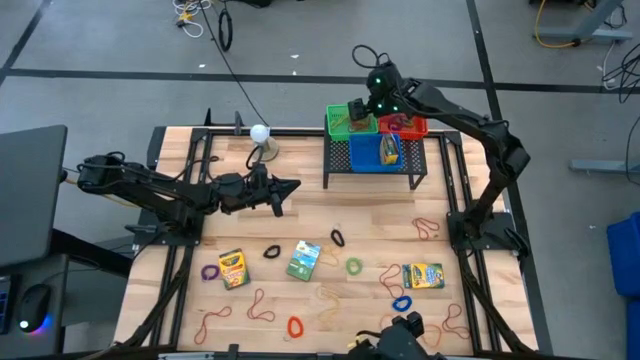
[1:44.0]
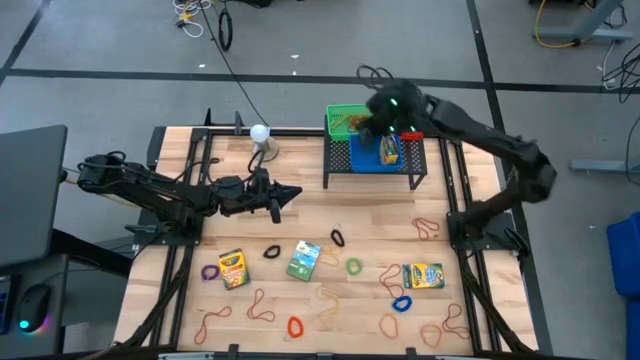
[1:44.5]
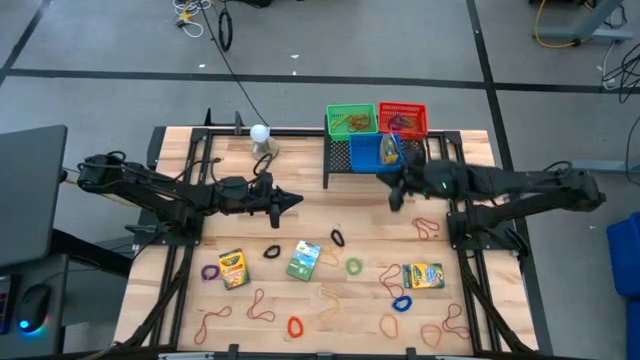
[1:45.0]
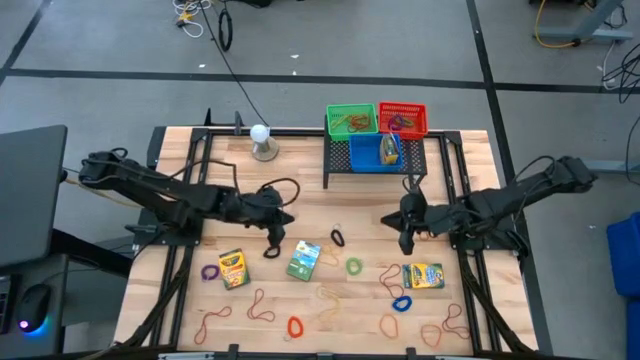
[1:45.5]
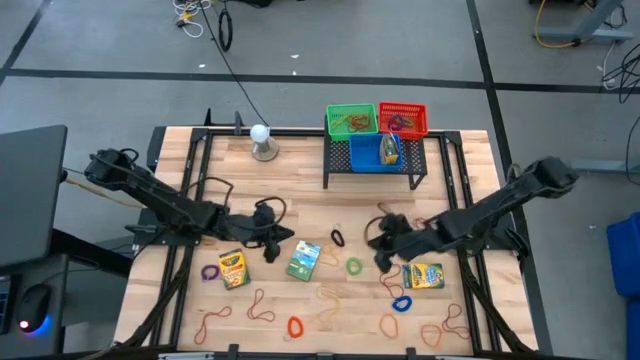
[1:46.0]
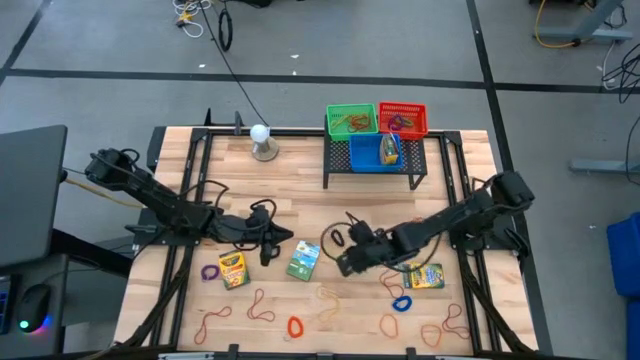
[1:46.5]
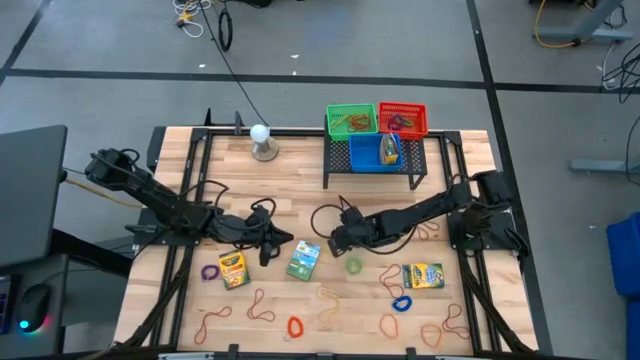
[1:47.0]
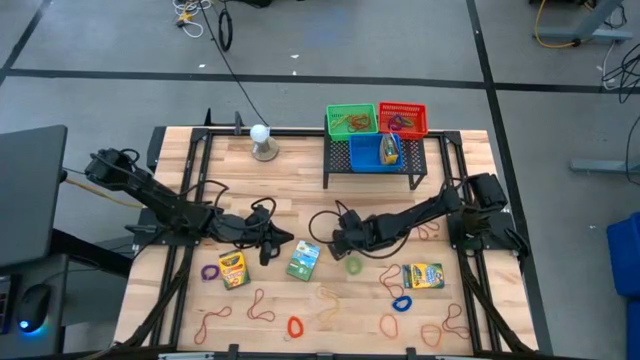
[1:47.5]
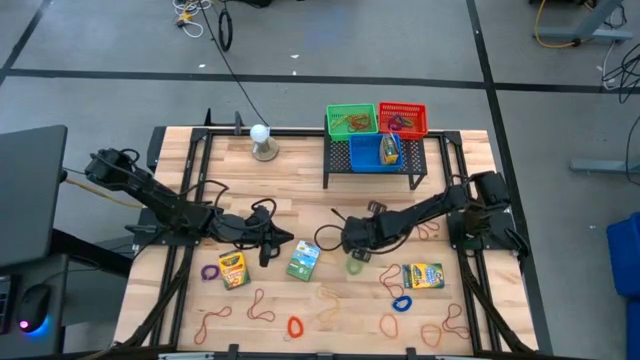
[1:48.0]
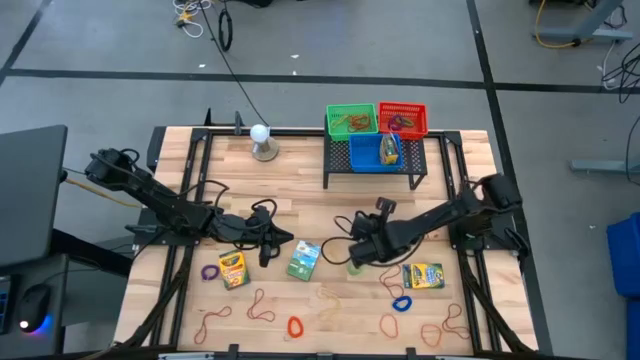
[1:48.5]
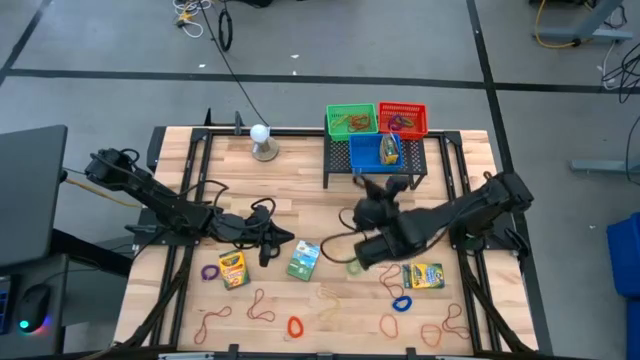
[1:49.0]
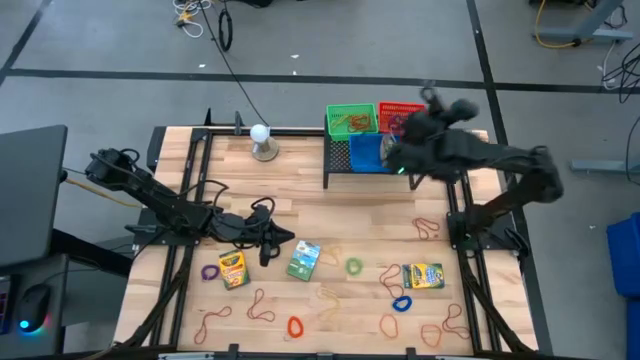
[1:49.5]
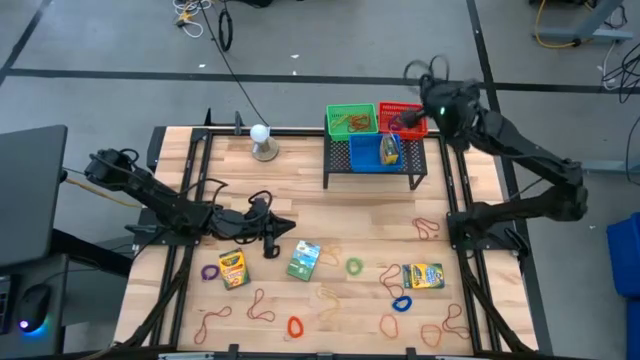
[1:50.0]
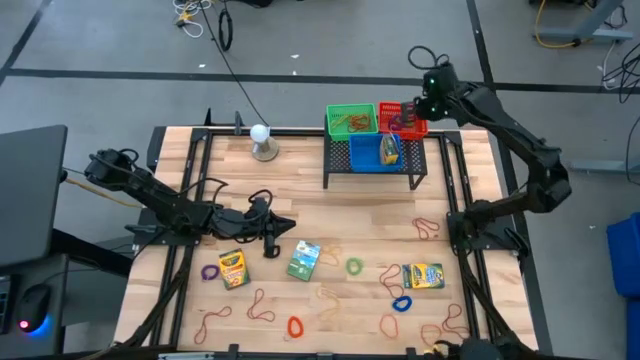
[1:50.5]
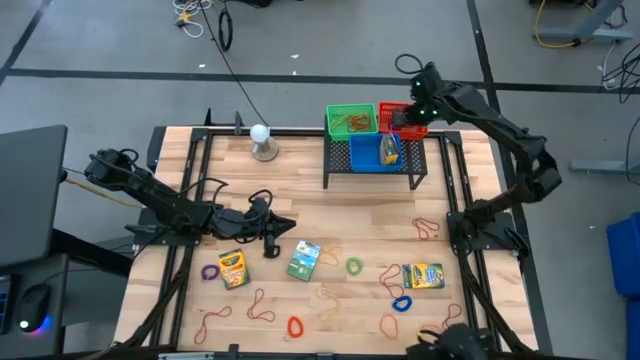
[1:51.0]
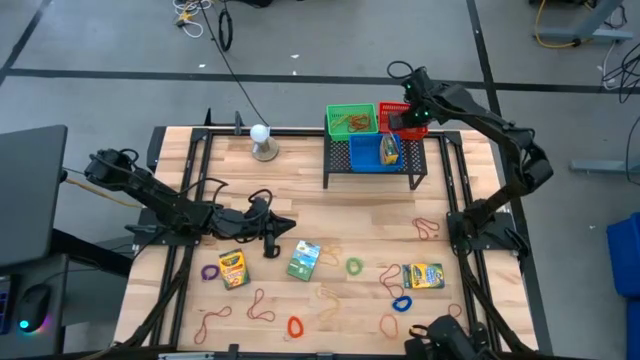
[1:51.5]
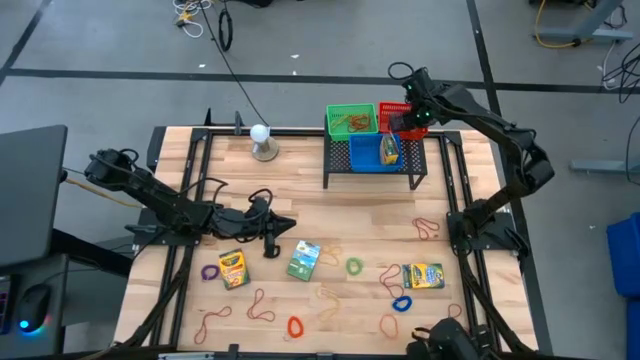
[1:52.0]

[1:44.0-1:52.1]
Task: Pick & Place Office Desk Supplies
Put the black spiral keychain into the red bin

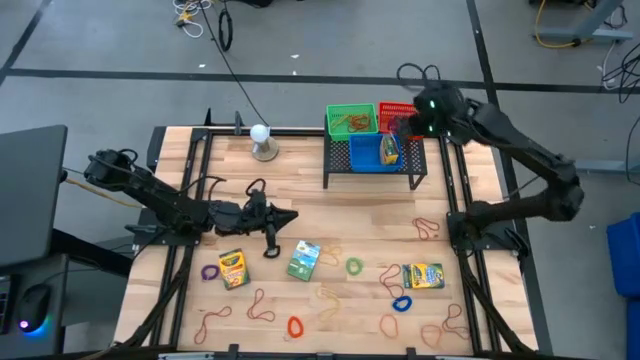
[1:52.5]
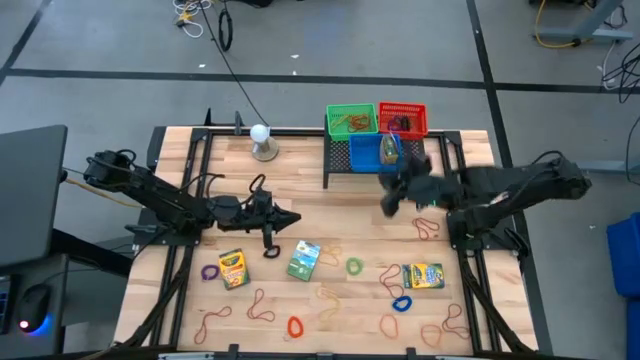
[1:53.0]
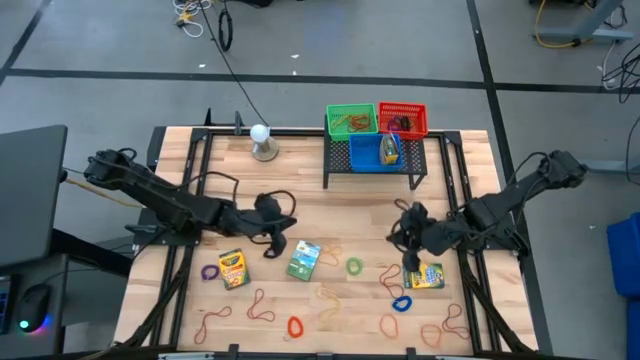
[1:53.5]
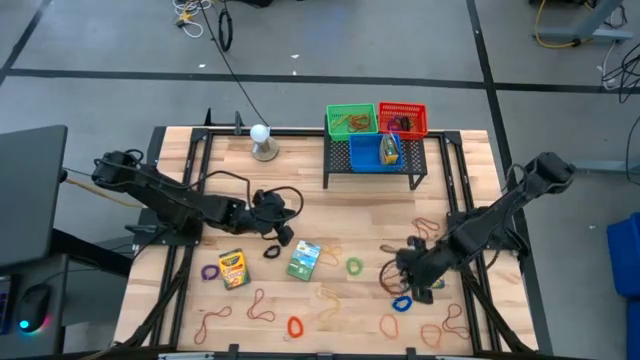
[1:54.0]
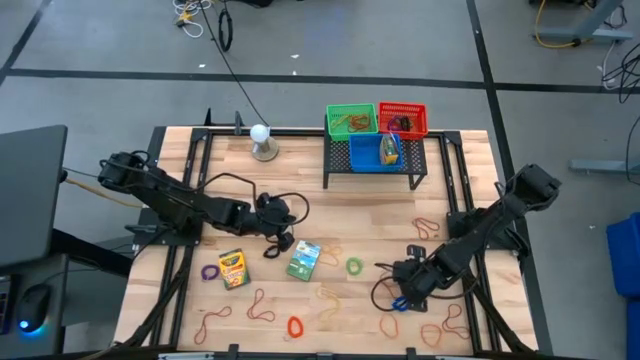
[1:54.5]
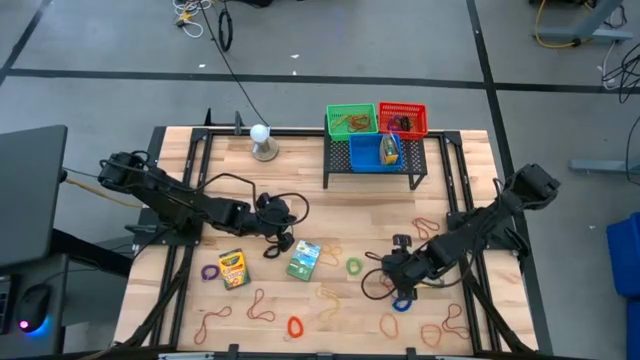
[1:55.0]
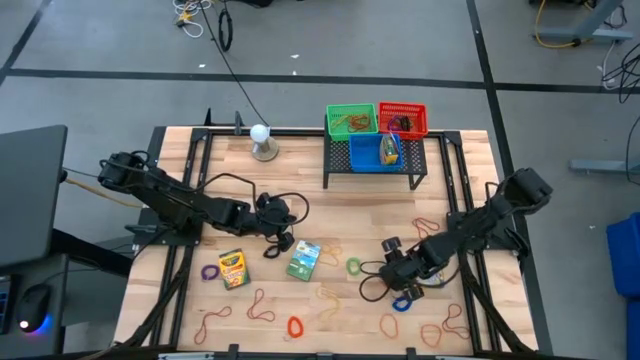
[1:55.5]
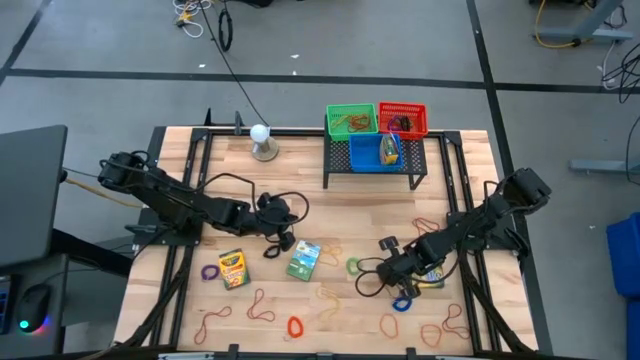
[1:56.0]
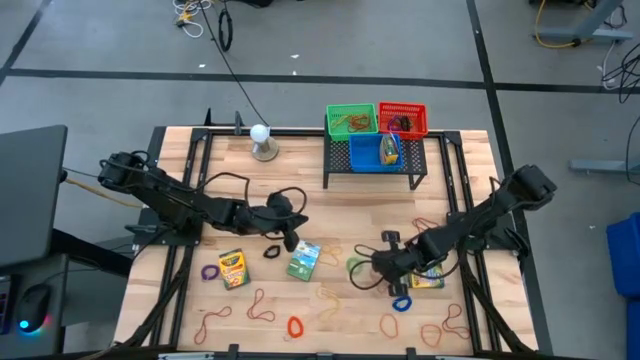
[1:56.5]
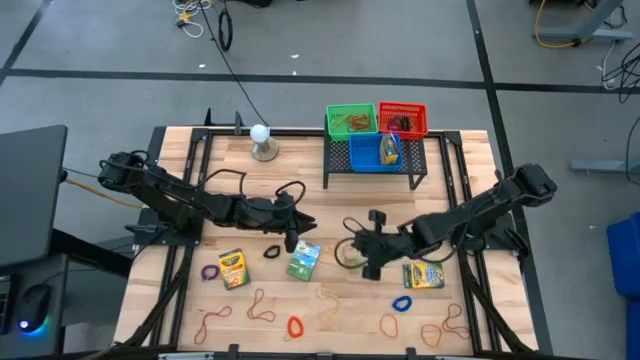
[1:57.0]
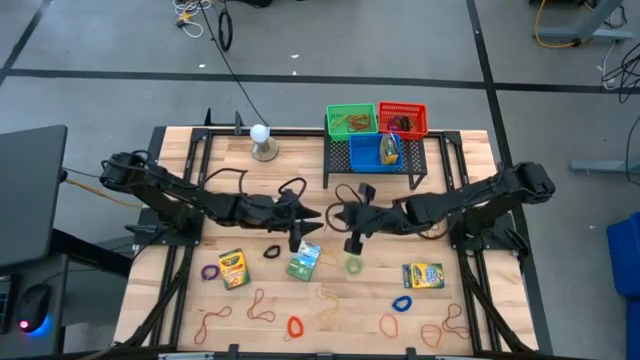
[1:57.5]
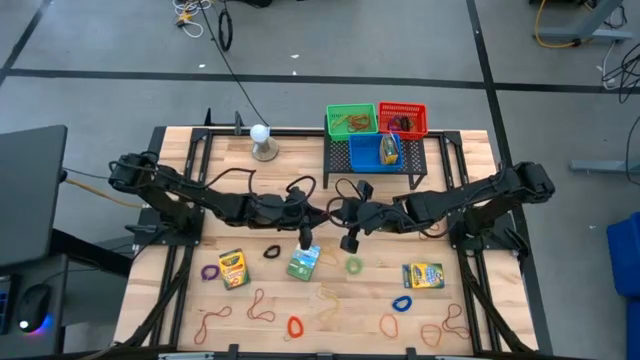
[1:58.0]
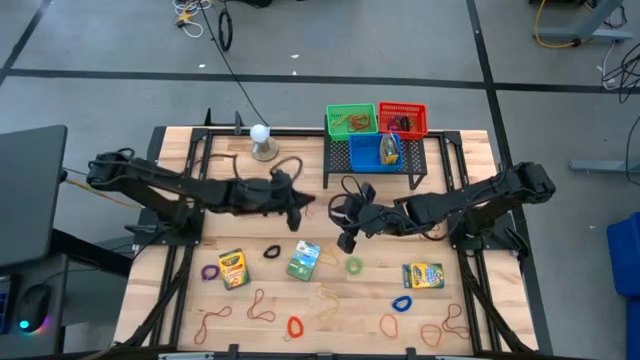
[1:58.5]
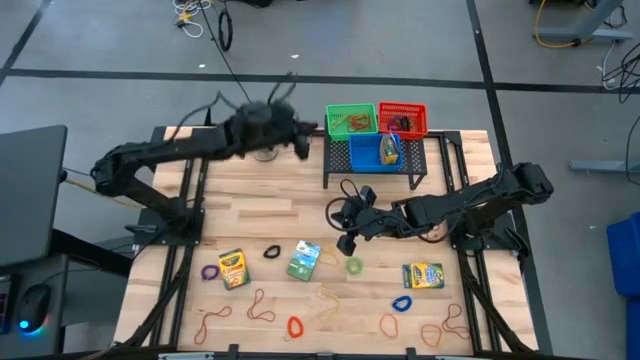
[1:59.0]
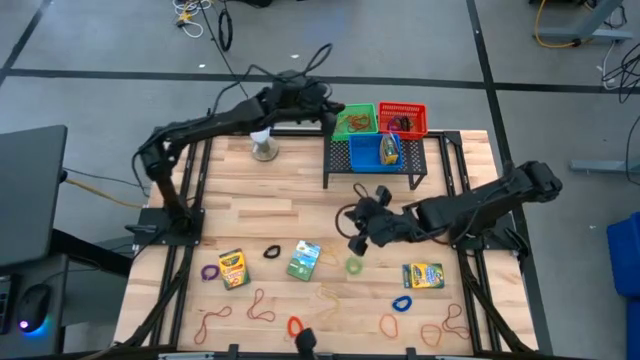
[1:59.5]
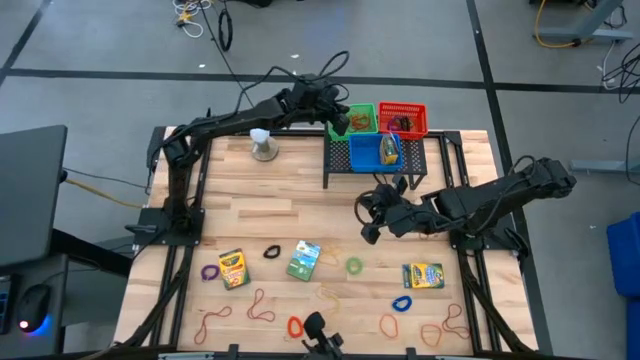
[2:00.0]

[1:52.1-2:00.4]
Put the red rubber band into the green bin

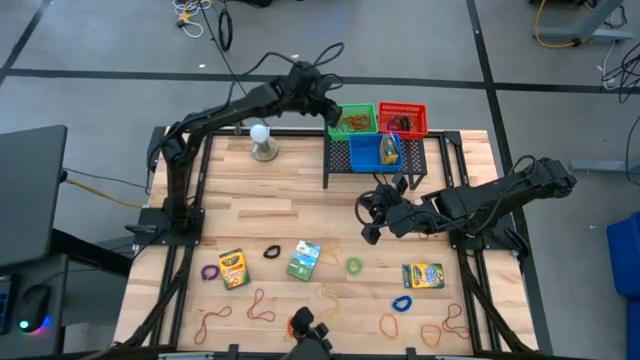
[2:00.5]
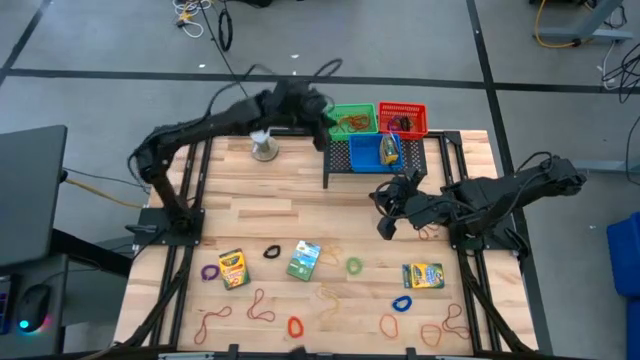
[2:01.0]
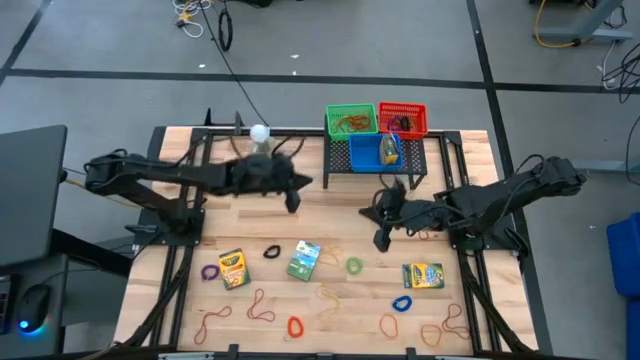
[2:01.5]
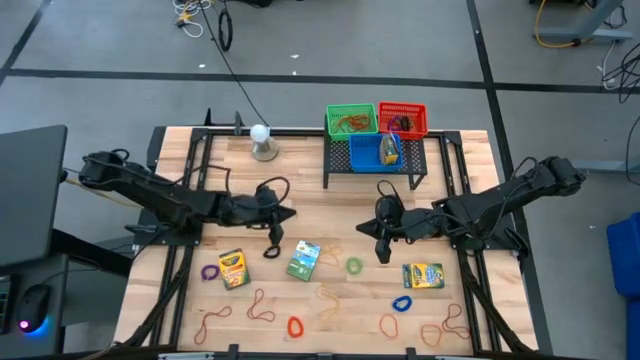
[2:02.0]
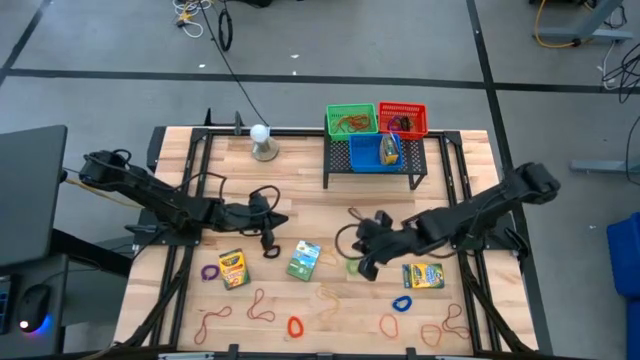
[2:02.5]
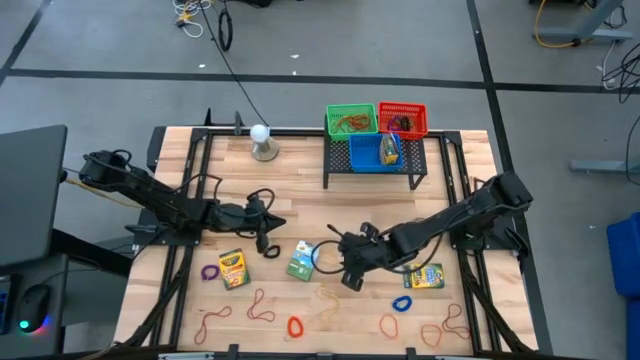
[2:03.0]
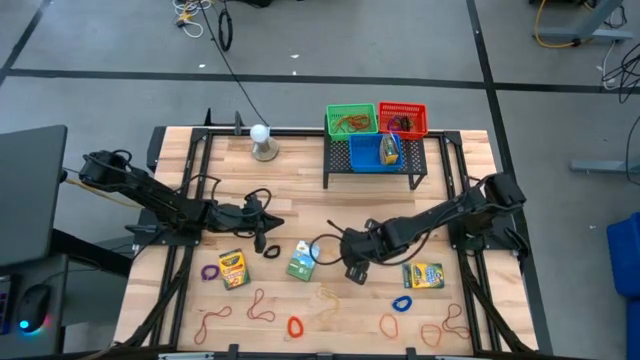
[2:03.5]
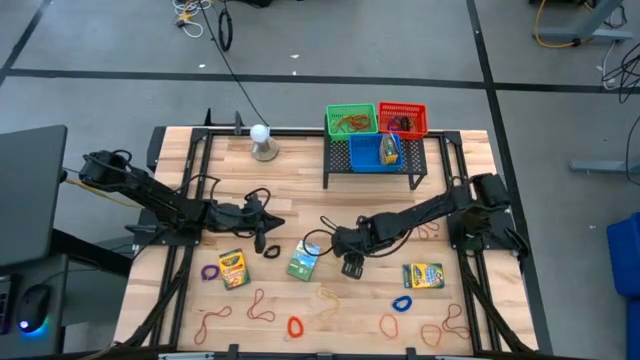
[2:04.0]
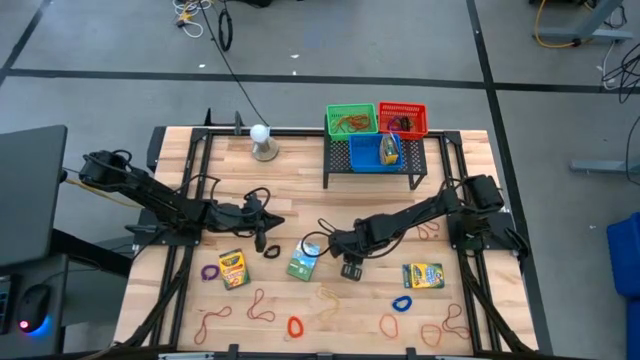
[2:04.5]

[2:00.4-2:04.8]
Put the green spiral keychain into the red bin

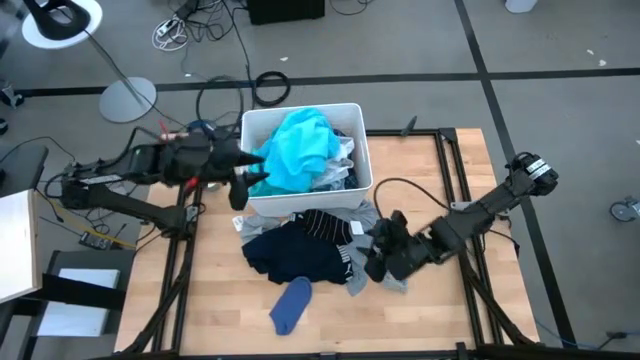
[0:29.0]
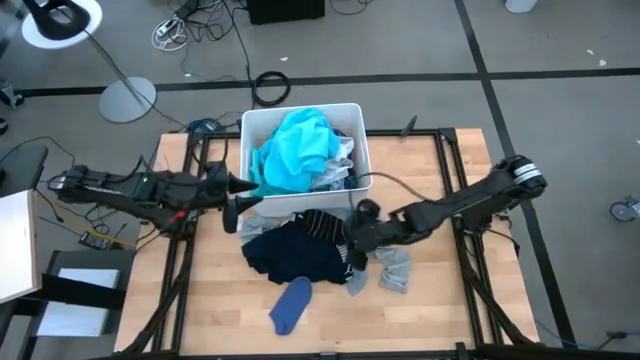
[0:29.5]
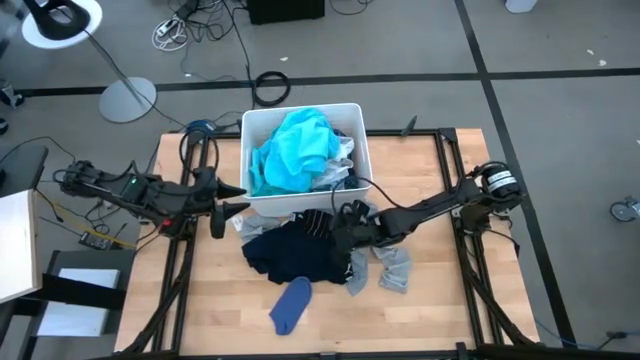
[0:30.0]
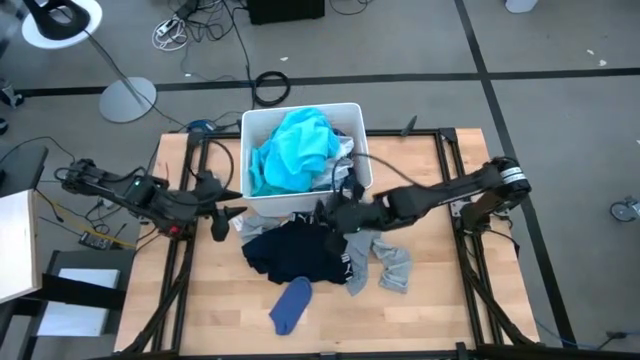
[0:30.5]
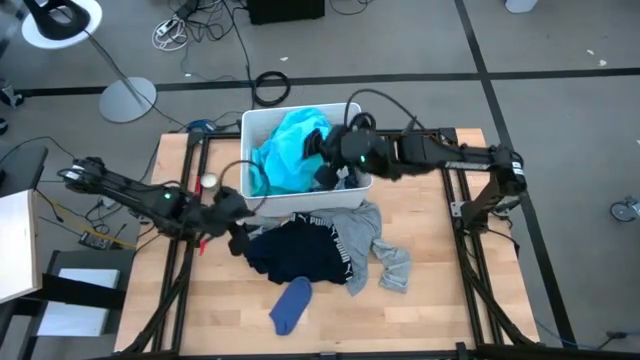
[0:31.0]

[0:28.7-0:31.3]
Task: Sort clothes
Put the black sock into the white bin
